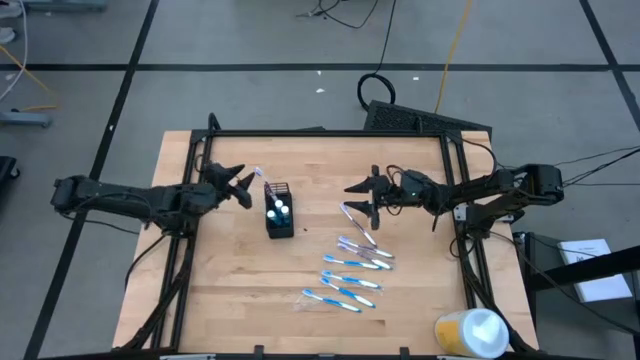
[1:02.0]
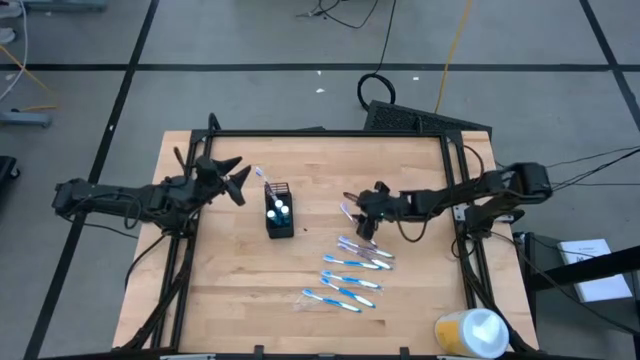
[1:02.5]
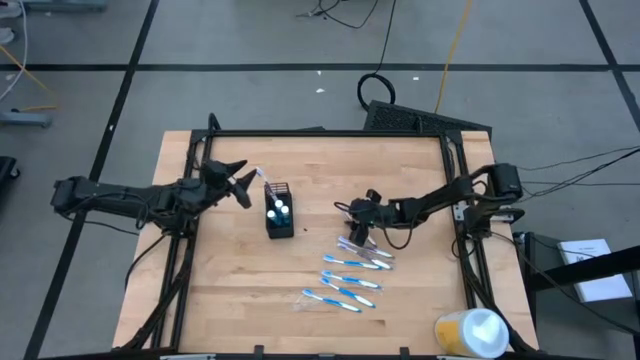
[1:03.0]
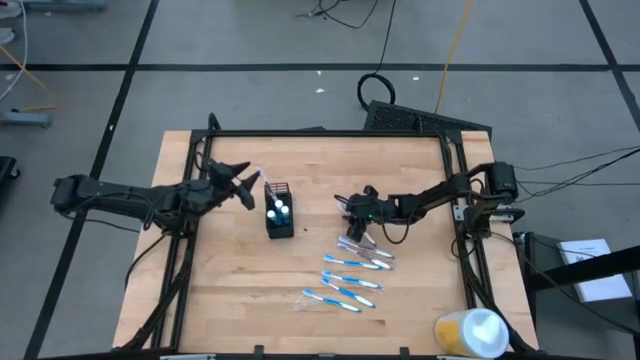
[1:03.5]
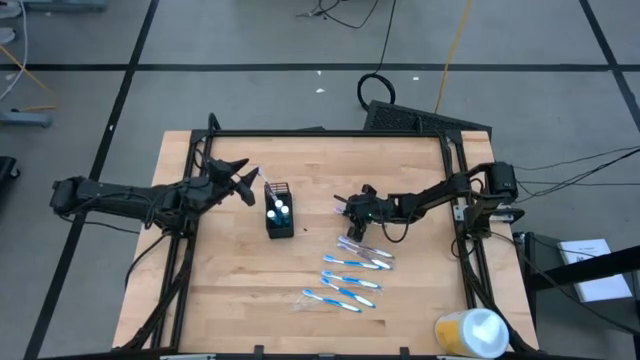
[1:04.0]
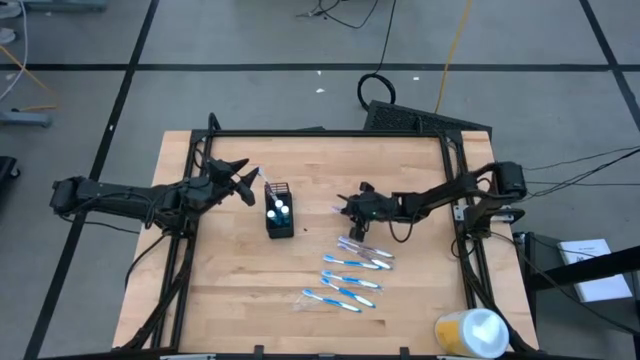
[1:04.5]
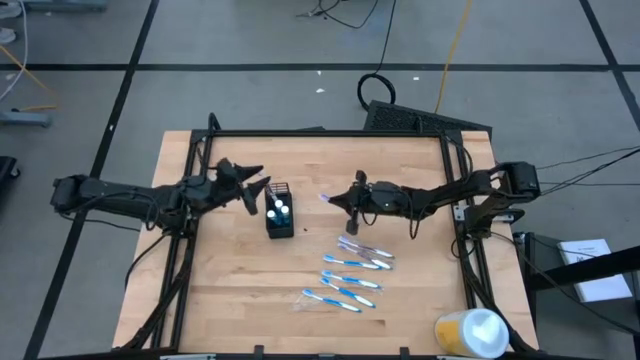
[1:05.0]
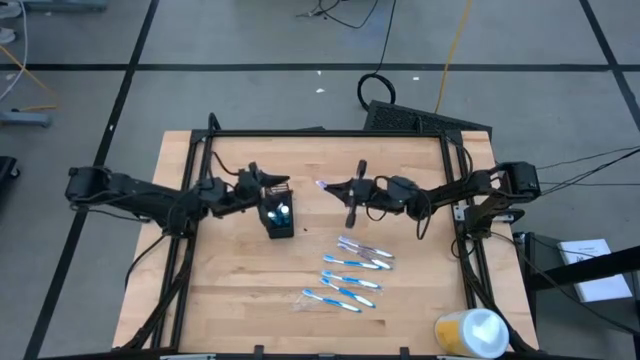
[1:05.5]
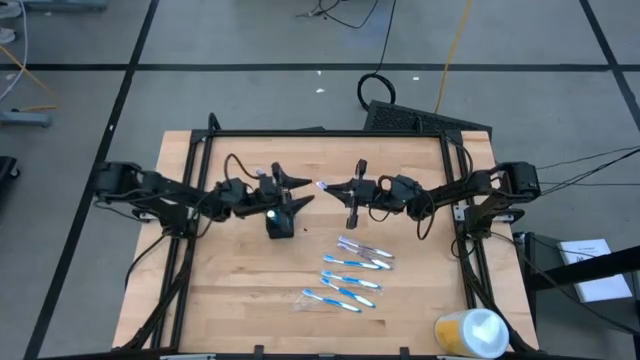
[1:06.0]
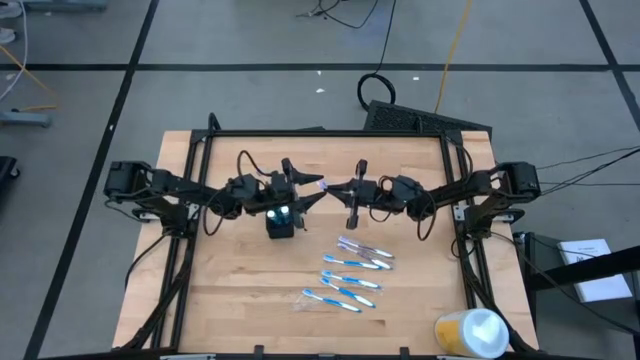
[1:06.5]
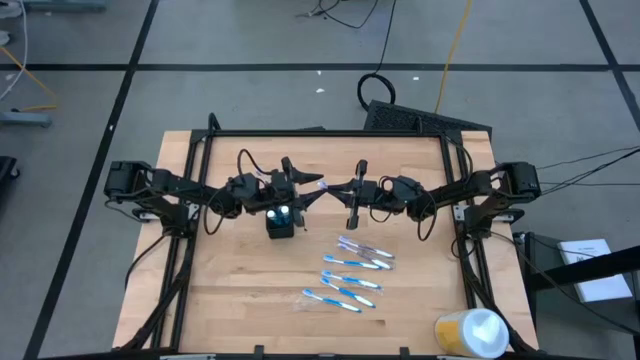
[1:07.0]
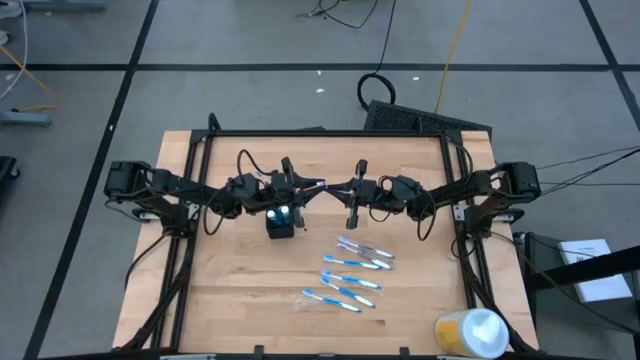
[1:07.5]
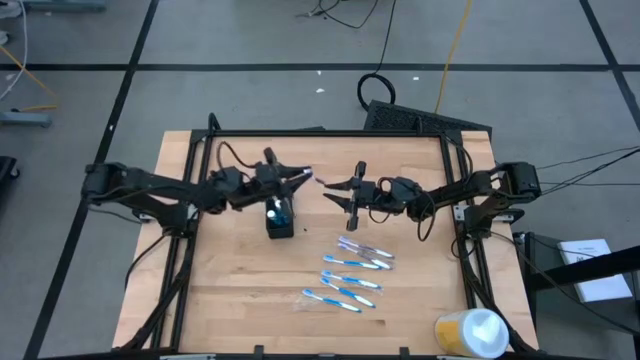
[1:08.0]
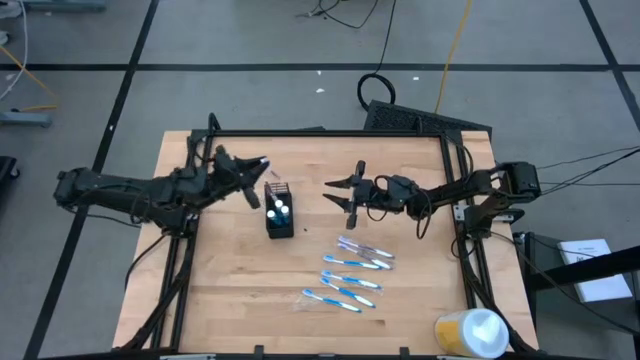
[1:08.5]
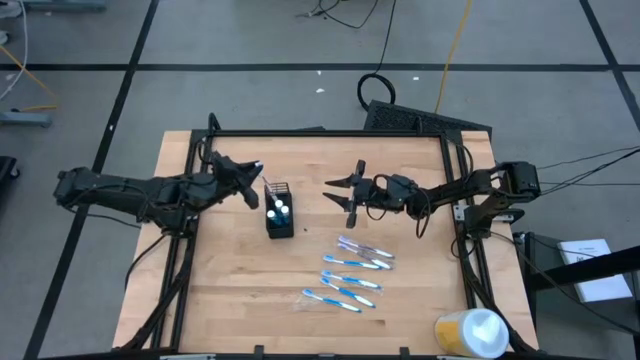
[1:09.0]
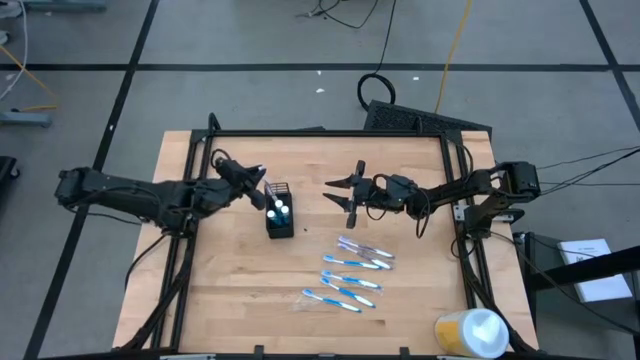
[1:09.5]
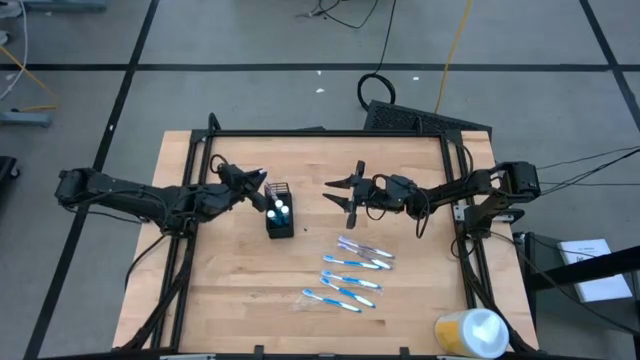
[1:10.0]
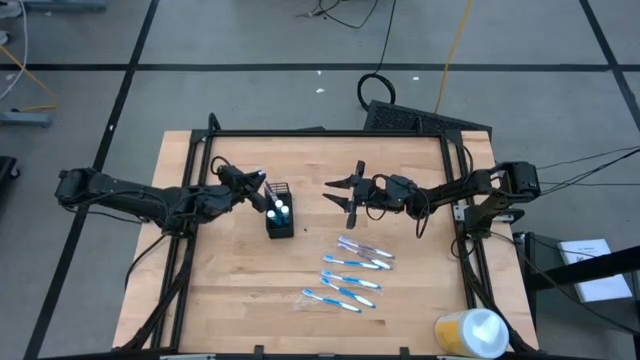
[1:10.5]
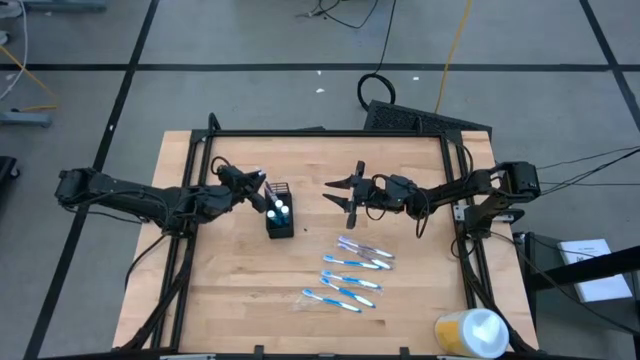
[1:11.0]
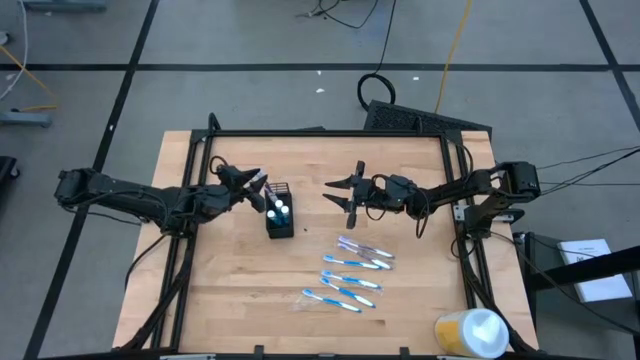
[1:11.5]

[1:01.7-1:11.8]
Task: Pick & Place toothbrushing station
Put the purple toothbrush into the black organizer

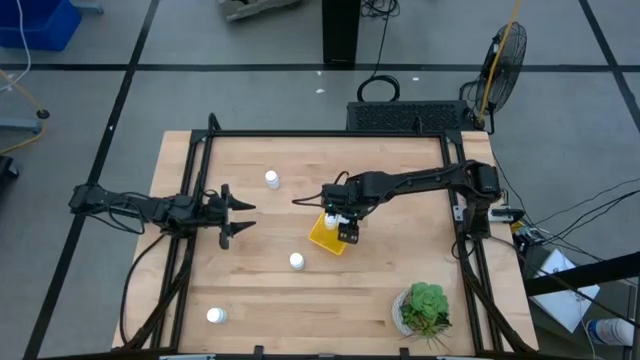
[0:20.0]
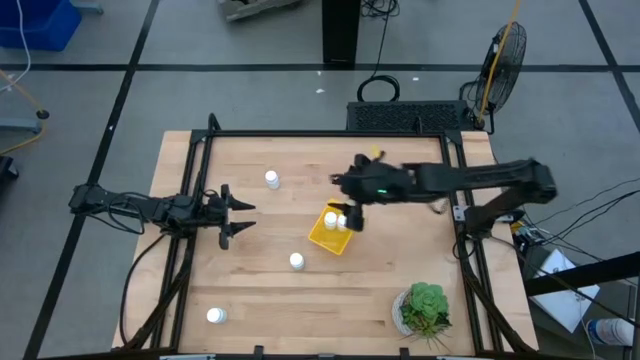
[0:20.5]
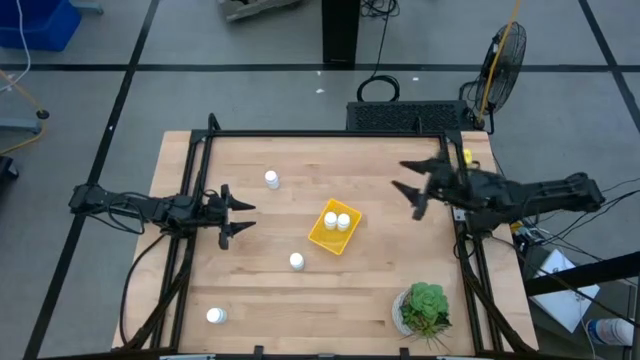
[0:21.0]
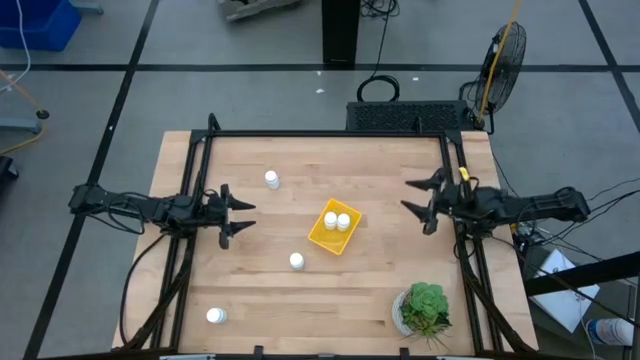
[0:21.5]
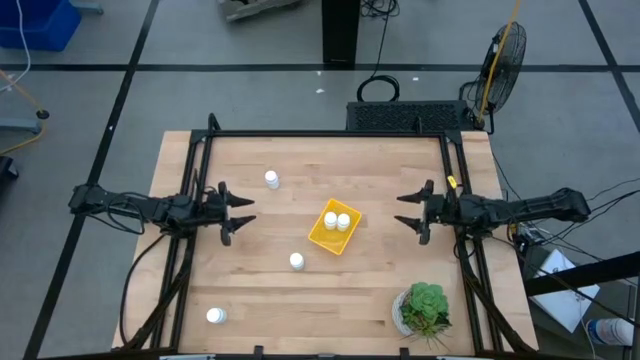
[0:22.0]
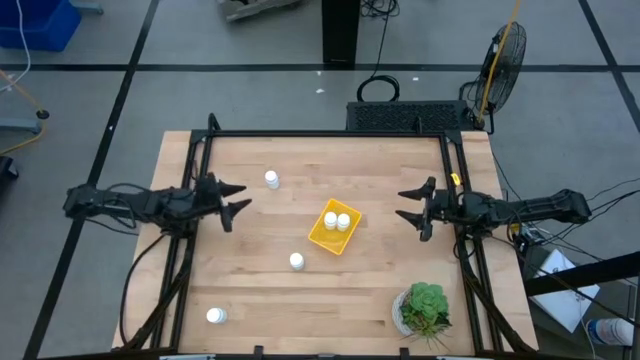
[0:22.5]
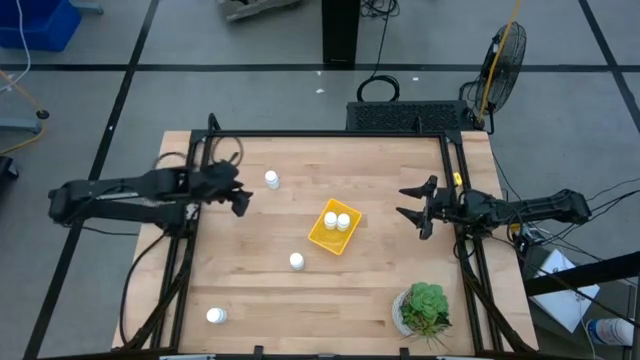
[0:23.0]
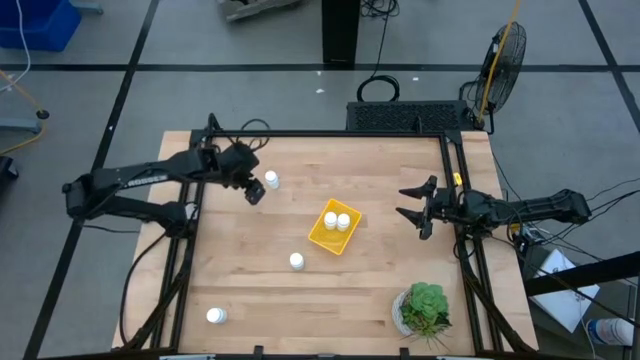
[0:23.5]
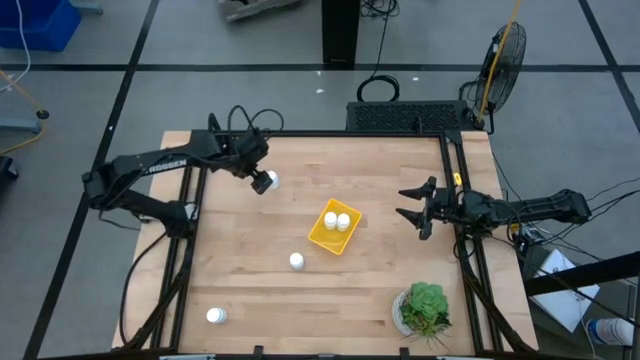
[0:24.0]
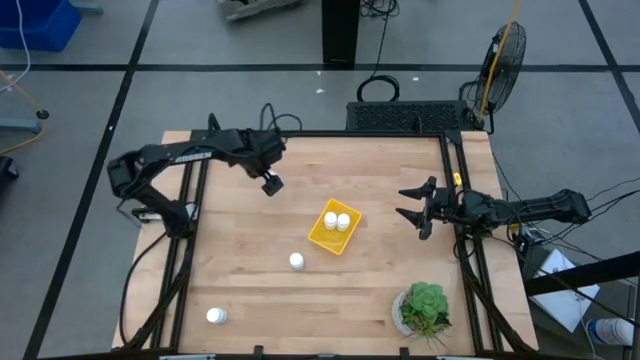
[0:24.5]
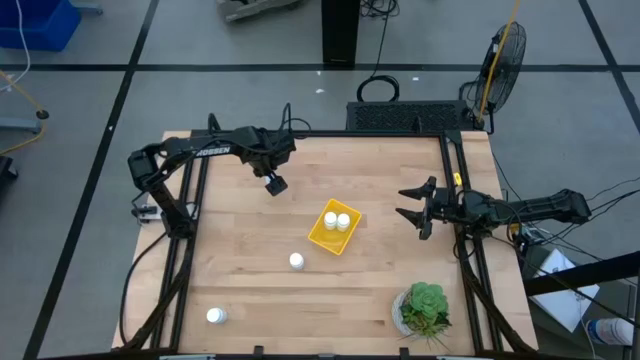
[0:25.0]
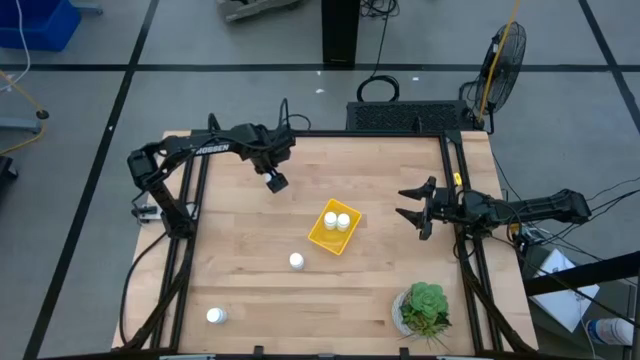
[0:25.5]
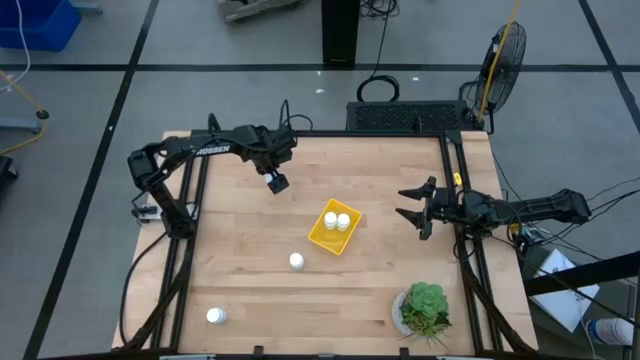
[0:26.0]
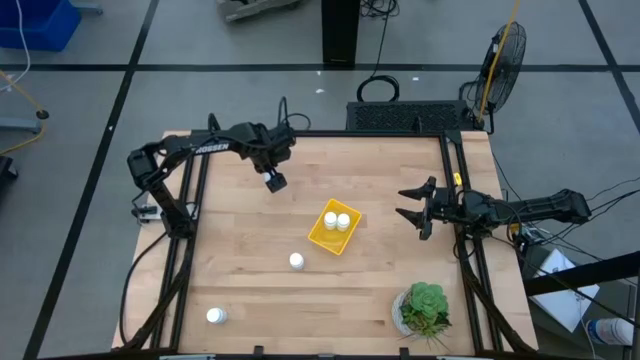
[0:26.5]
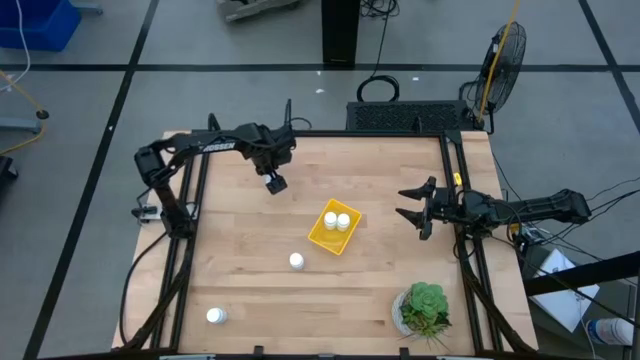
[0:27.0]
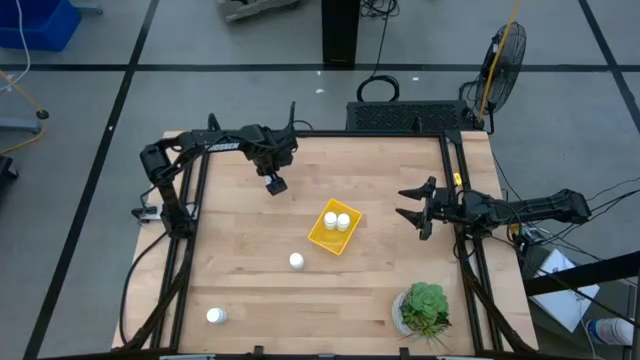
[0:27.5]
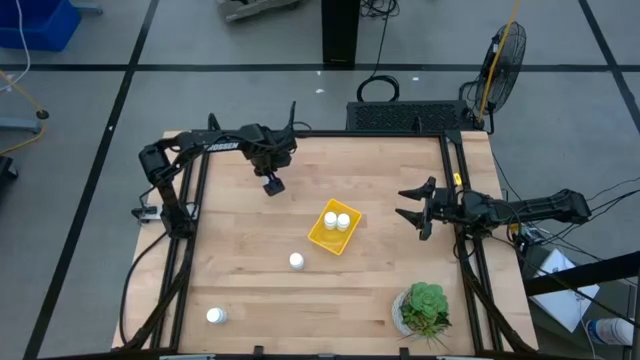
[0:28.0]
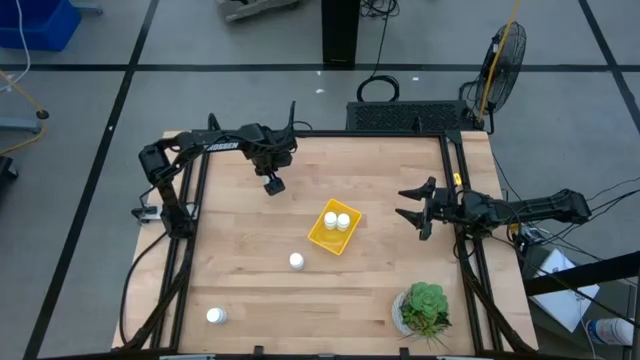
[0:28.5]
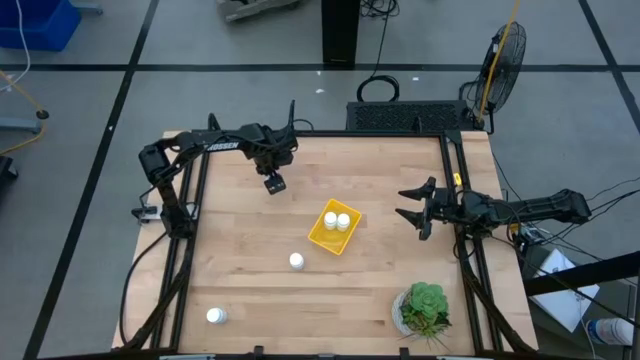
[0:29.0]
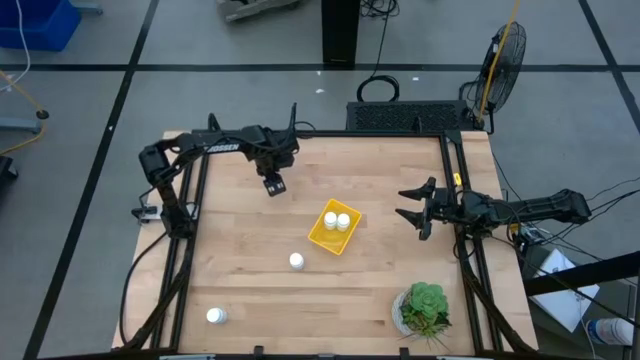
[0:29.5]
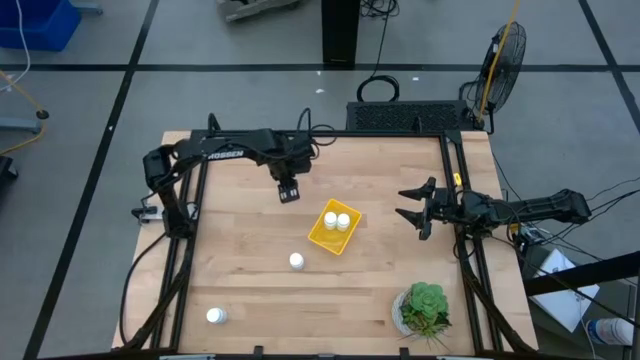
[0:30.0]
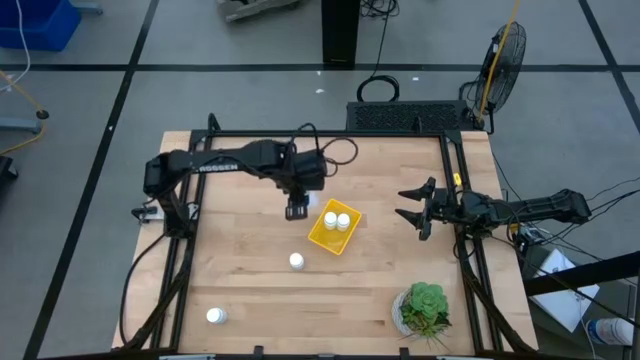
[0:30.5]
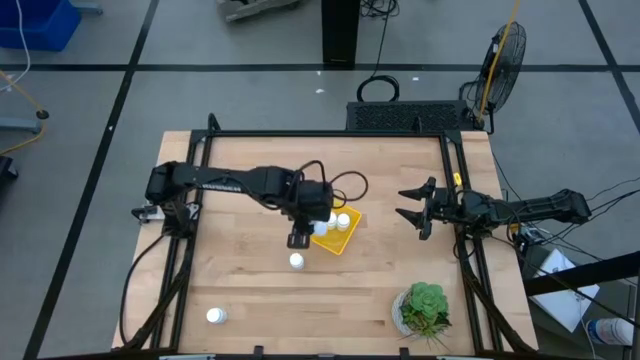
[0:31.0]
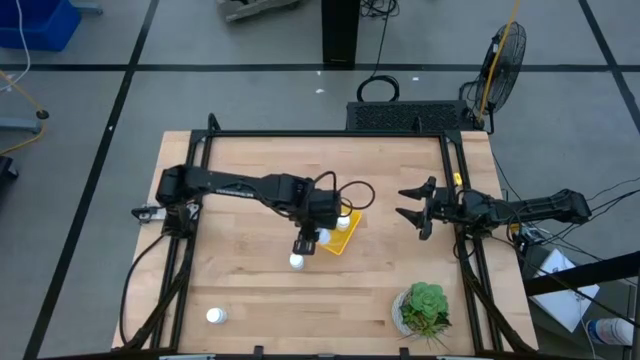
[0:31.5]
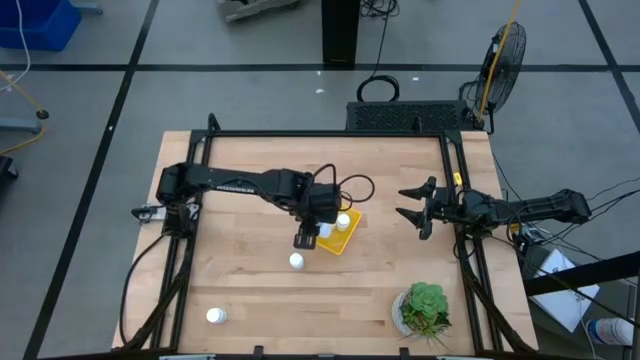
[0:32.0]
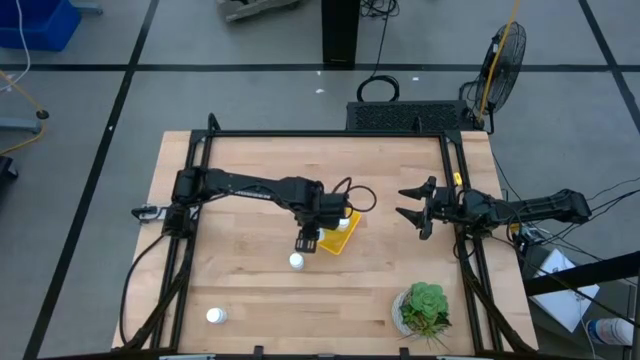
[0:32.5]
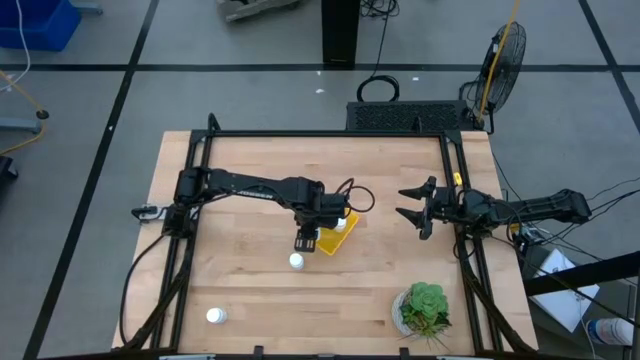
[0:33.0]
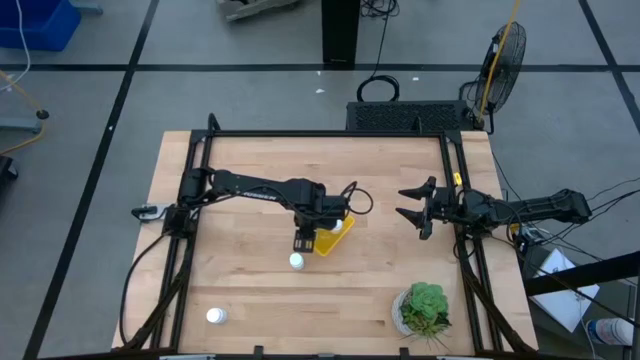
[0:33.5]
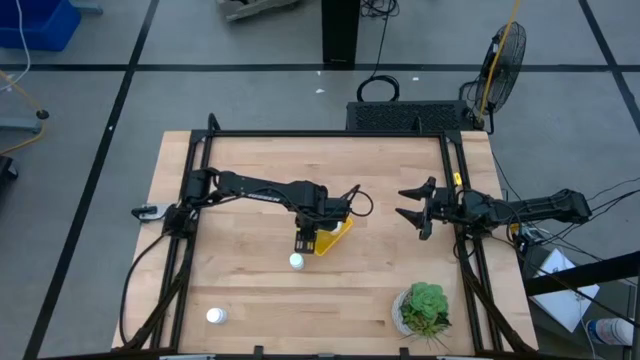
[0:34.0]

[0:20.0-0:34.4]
Task: Pick and place pill bottles into a basket
Put the white medicine bottle into the yellow bin
